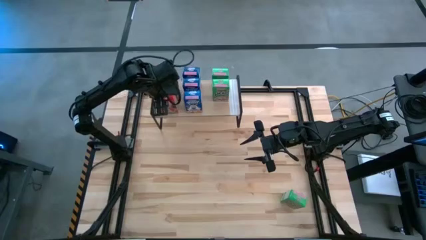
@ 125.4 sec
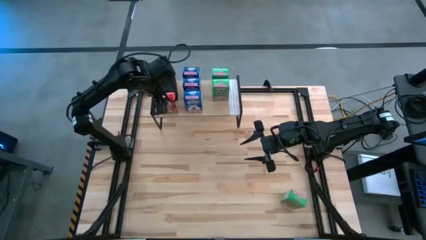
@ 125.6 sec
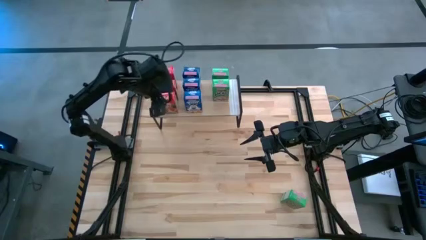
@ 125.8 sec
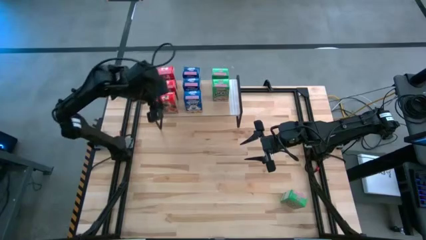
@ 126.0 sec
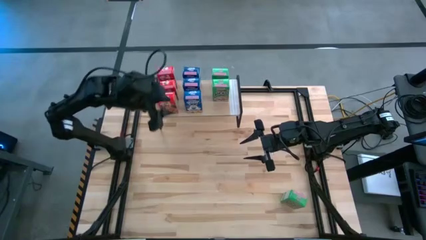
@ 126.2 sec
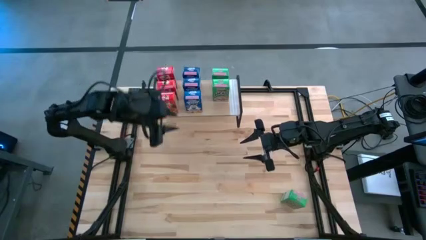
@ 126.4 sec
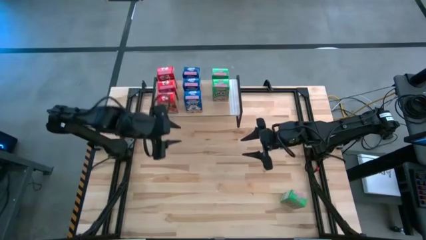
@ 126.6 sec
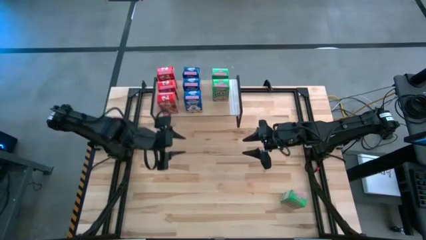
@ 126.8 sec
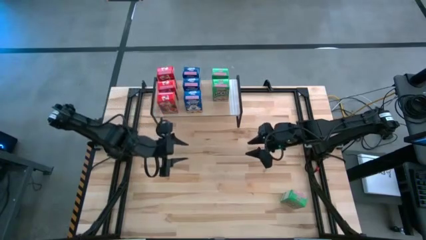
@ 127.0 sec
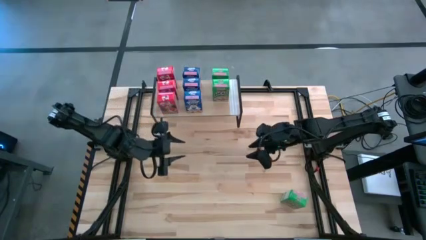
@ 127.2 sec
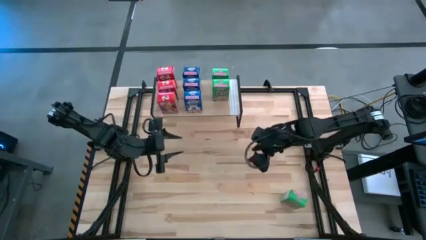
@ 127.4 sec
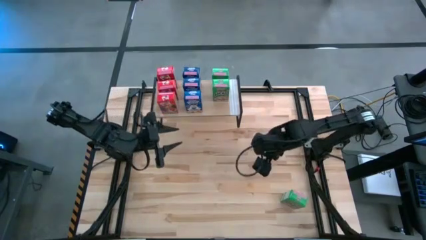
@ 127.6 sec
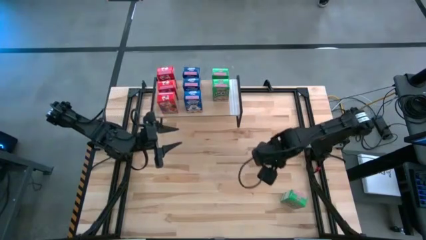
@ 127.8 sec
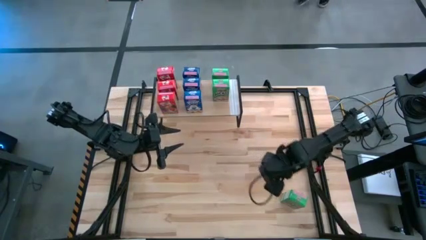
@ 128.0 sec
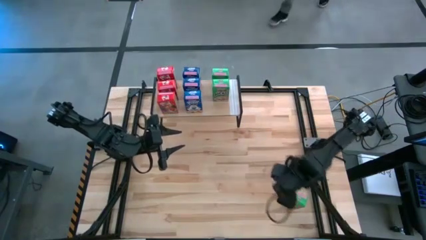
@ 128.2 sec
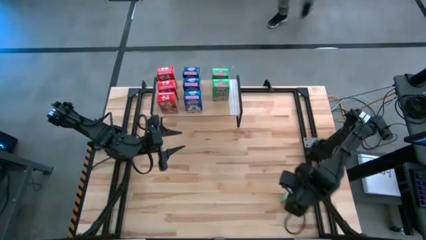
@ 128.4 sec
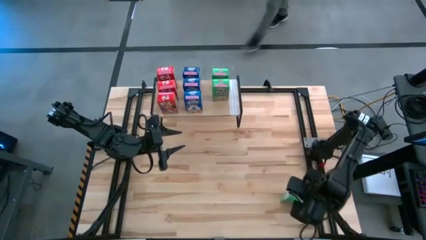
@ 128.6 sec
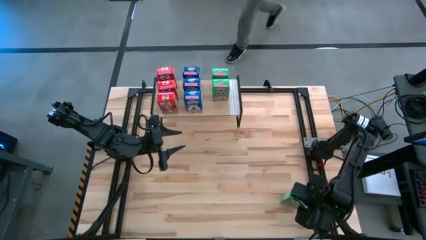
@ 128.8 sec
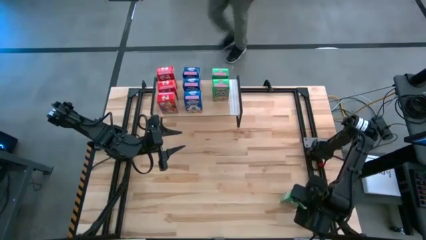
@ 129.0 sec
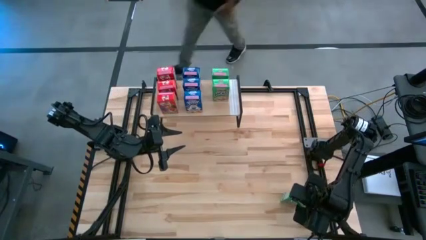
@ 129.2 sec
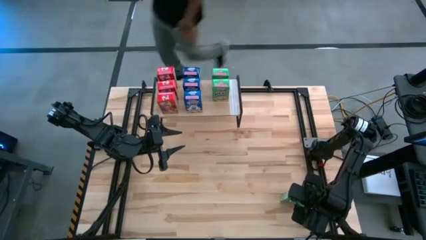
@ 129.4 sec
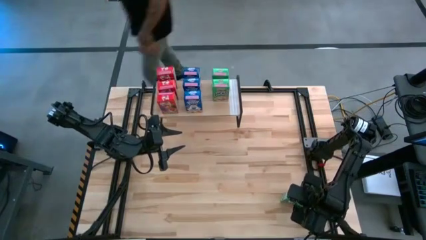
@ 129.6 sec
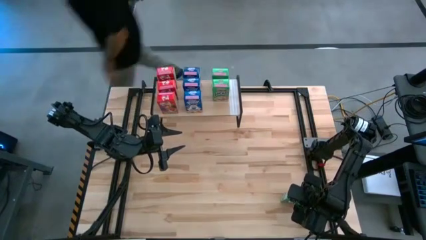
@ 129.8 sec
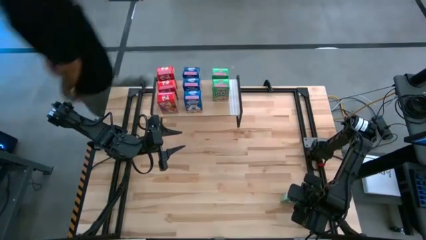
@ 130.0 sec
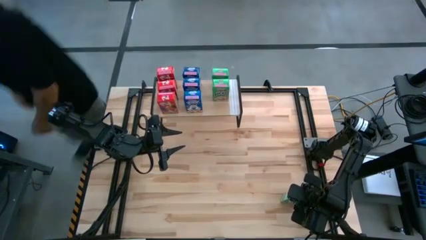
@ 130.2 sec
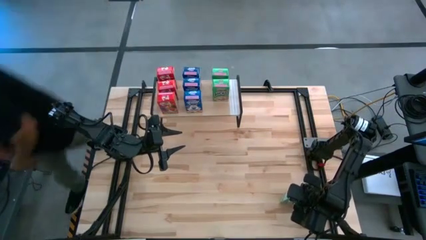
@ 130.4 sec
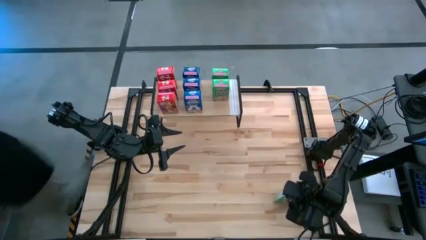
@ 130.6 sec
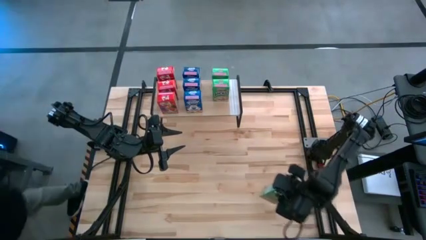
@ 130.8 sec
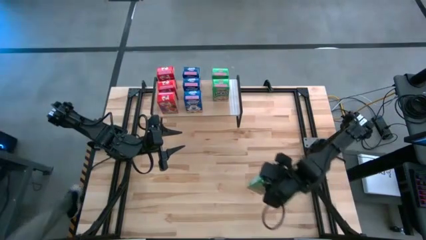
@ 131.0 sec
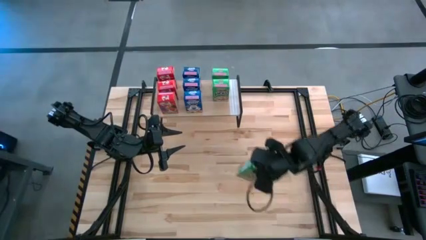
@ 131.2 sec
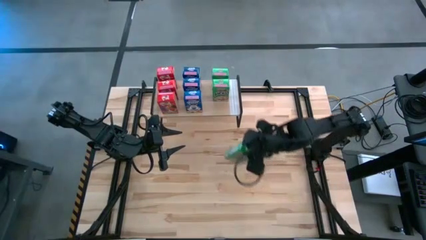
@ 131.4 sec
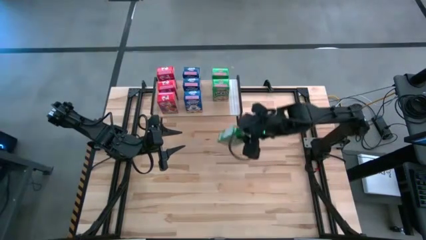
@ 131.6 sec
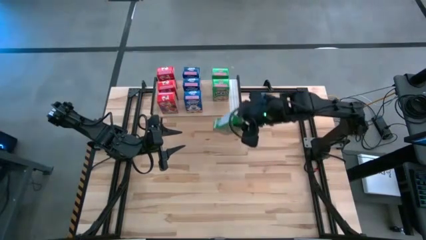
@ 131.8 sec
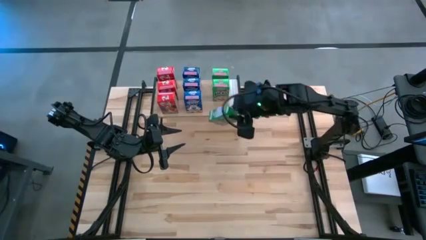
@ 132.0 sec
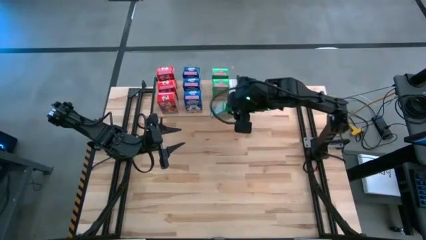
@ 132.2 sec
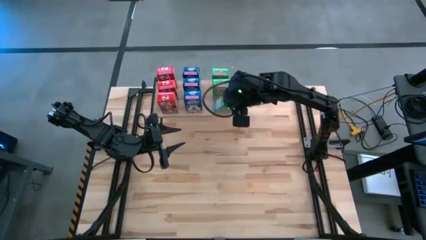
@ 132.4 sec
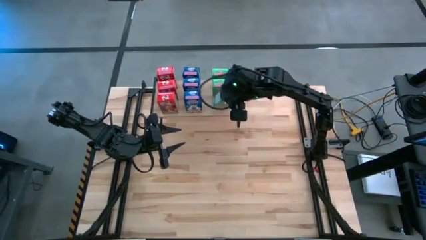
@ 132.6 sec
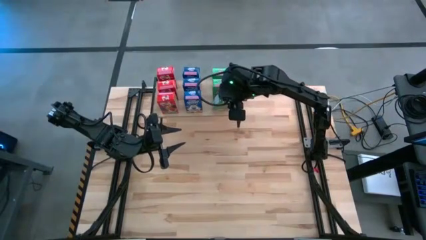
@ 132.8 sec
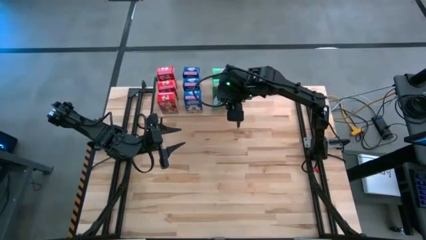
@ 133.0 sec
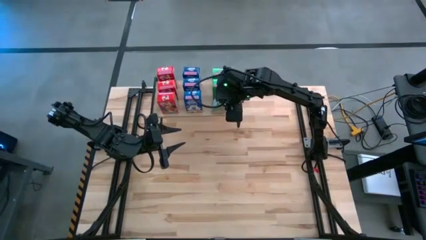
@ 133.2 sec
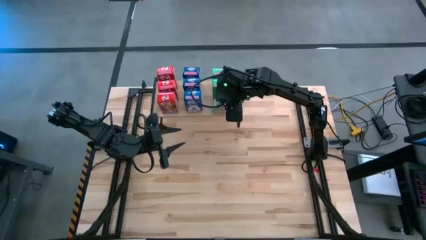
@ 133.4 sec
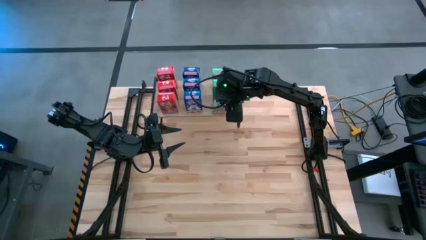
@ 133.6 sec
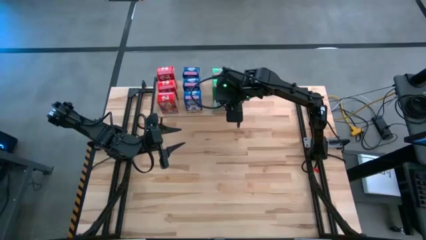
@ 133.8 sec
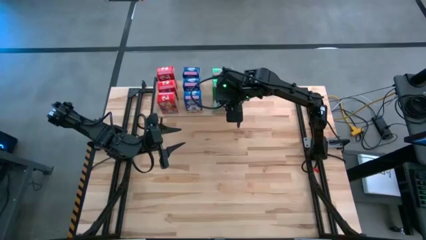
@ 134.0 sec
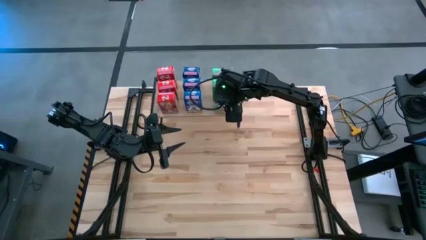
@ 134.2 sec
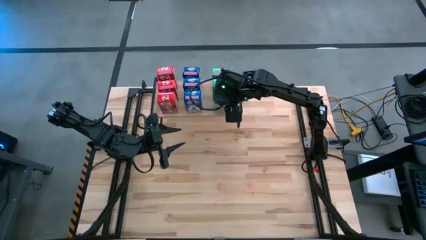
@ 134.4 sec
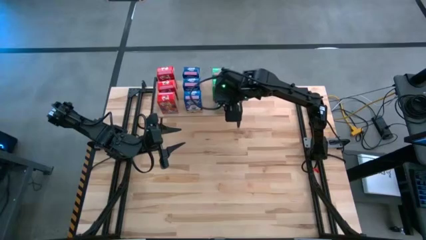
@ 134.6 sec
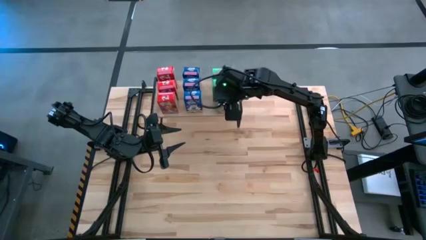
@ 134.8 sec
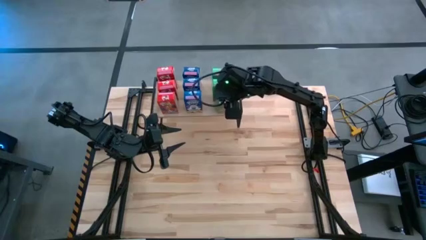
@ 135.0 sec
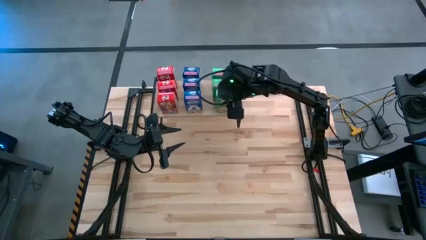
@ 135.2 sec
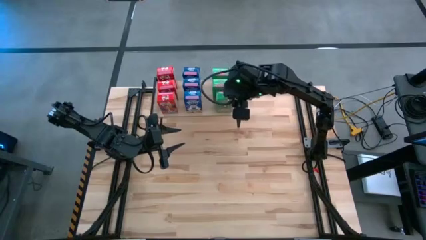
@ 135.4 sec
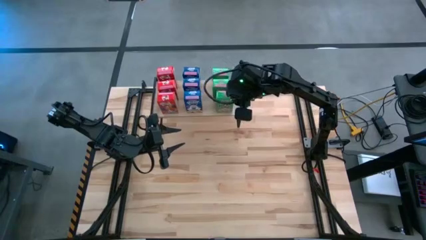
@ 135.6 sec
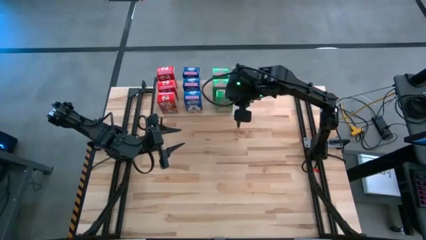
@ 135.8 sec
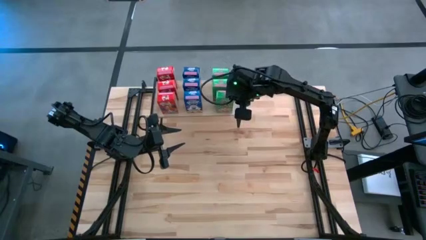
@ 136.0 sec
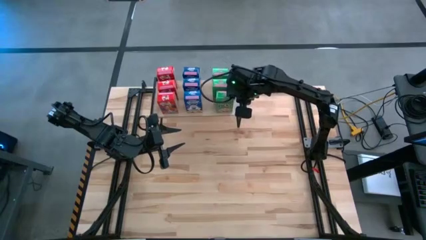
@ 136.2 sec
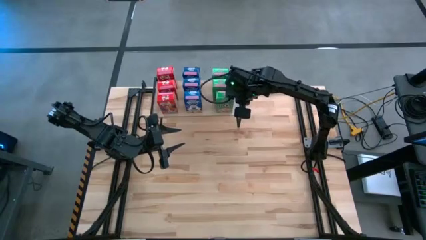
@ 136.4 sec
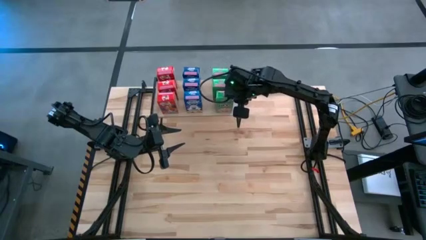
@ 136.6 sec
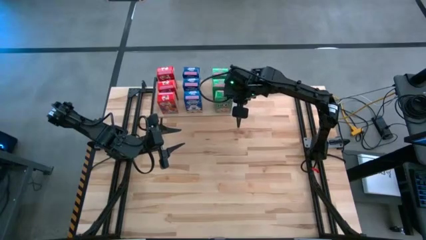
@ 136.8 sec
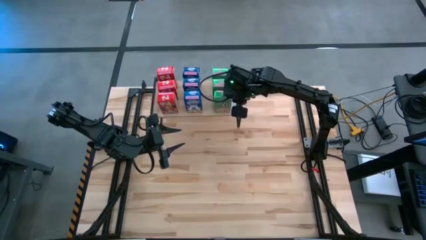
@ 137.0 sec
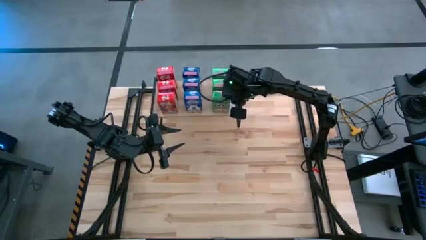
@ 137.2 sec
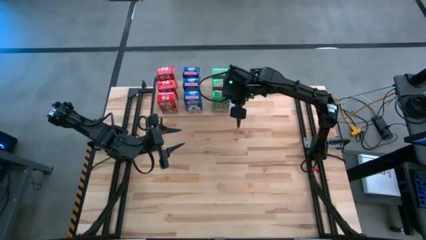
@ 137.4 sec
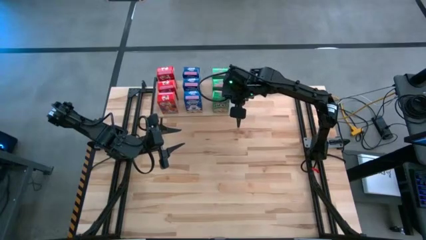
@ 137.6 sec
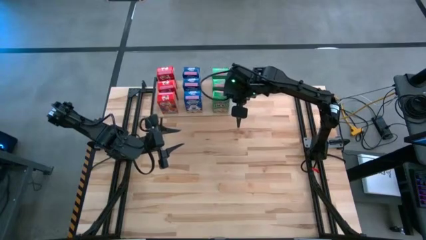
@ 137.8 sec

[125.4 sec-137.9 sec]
Task: Stack cereal on shelf
Put the green cereal box on the shelf aligned with the green cereal boxes

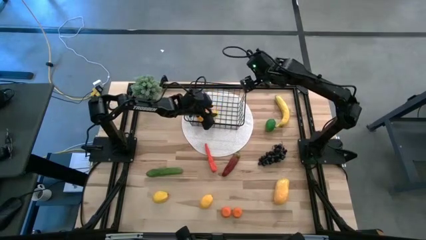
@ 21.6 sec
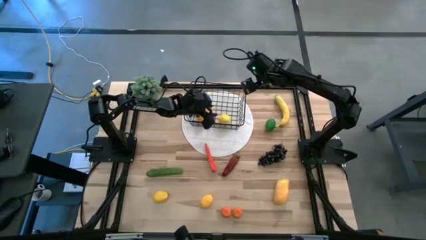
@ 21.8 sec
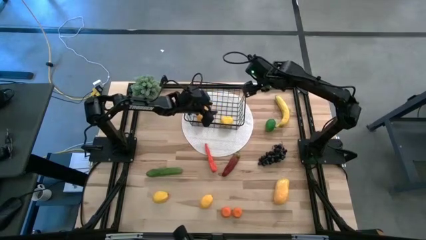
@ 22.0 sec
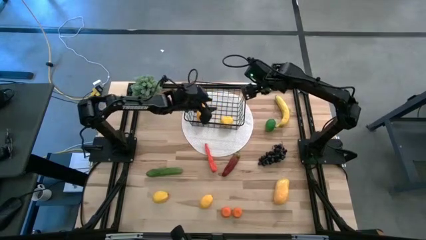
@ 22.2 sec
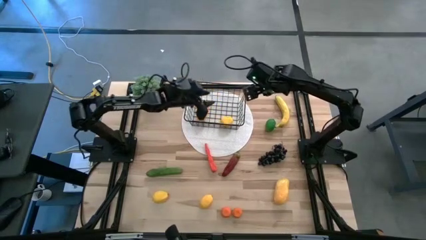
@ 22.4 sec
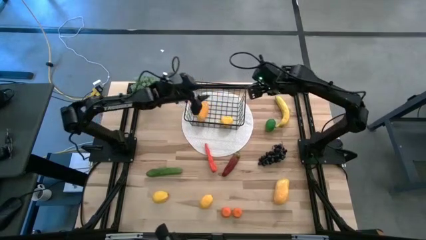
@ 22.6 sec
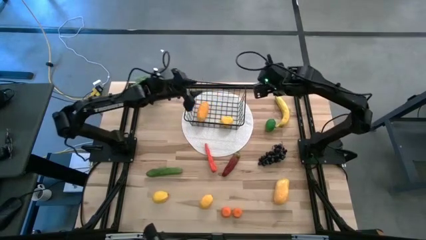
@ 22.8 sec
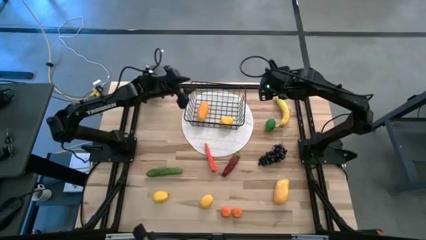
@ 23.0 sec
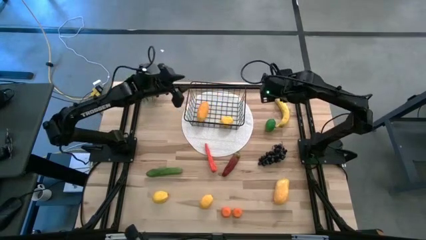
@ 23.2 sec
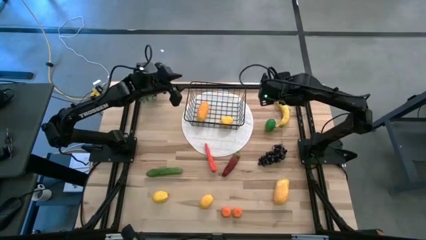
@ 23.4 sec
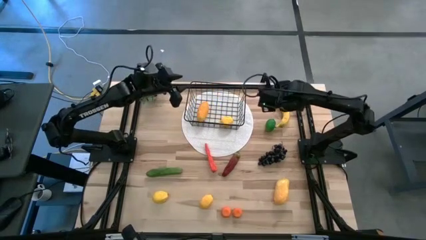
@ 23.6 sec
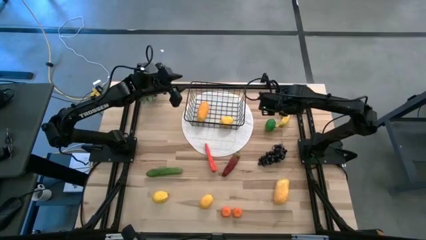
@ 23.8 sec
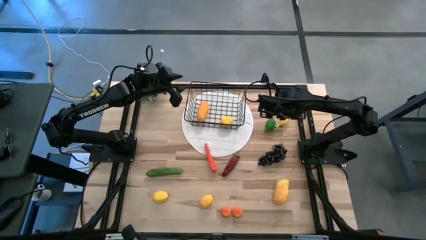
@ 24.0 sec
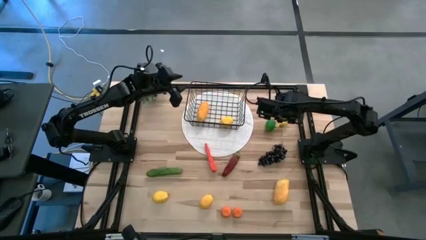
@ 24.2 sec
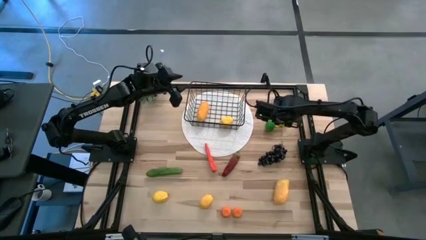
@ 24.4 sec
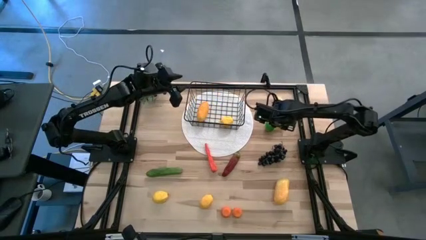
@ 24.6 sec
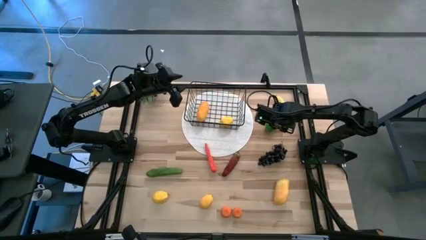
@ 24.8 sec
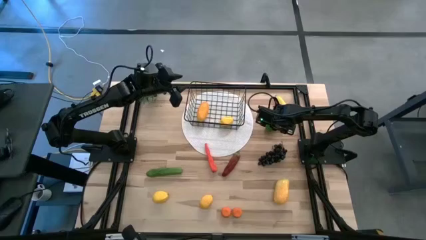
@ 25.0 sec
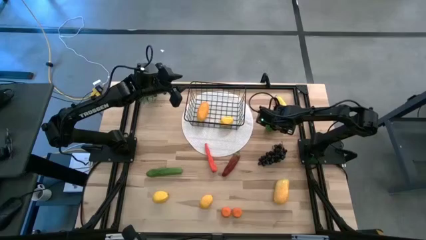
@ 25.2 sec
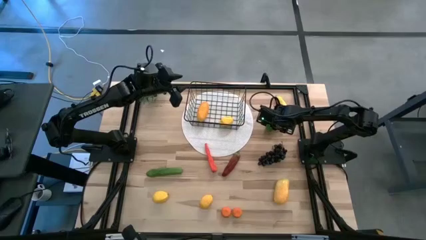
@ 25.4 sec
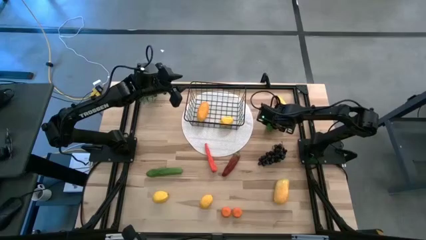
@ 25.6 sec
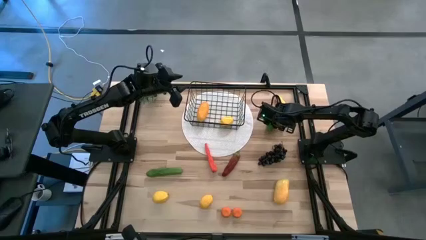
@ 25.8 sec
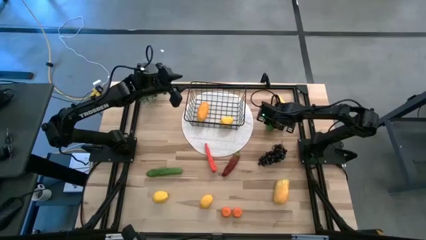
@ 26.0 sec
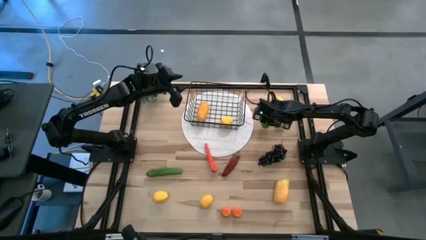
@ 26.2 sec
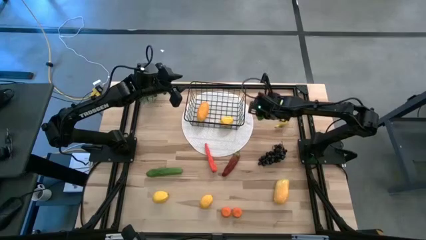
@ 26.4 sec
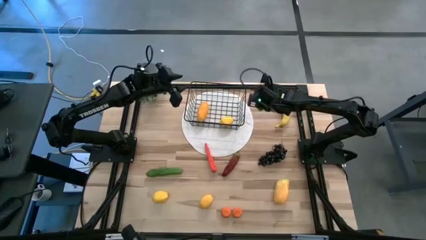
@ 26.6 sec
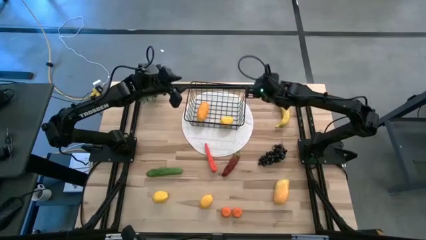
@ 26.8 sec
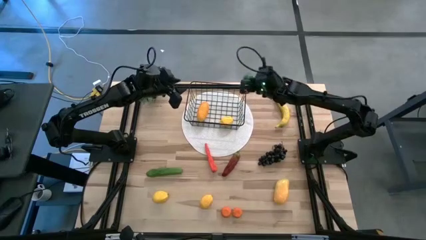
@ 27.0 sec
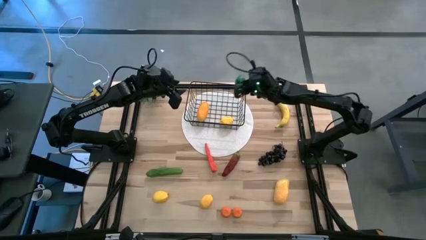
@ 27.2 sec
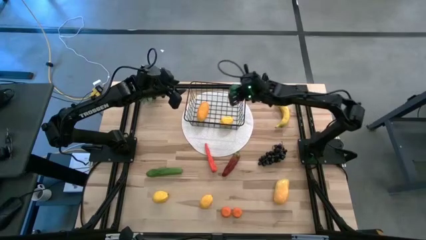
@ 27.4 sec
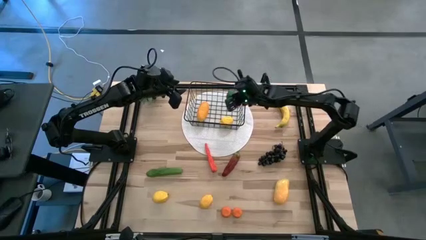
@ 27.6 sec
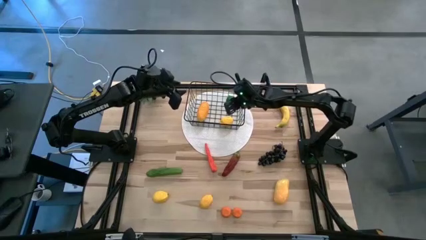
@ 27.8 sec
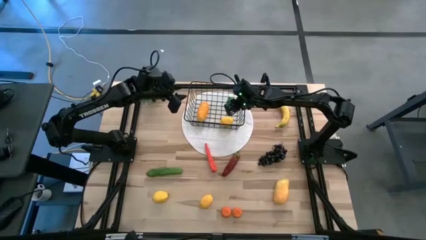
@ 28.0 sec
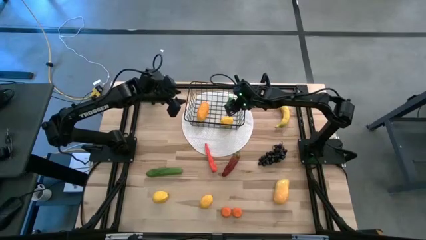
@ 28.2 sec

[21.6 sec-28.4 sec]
Task: Build produce basket
Put the lime into the wire basket
